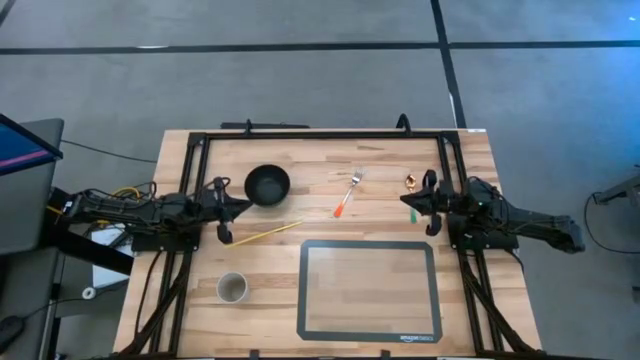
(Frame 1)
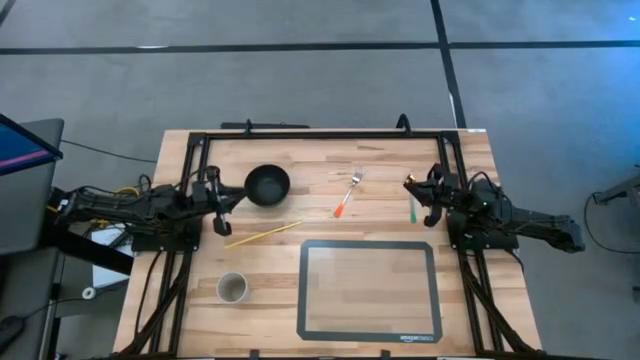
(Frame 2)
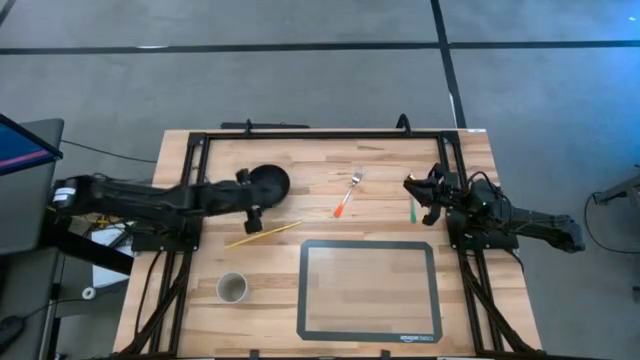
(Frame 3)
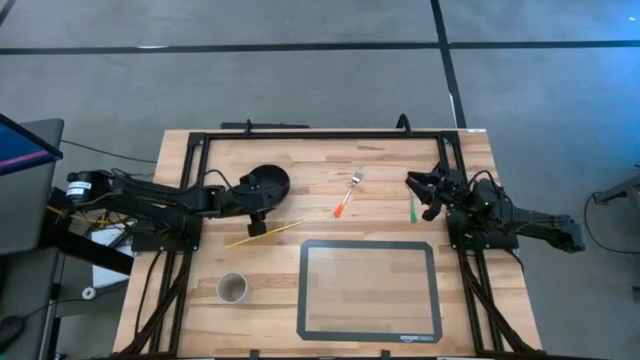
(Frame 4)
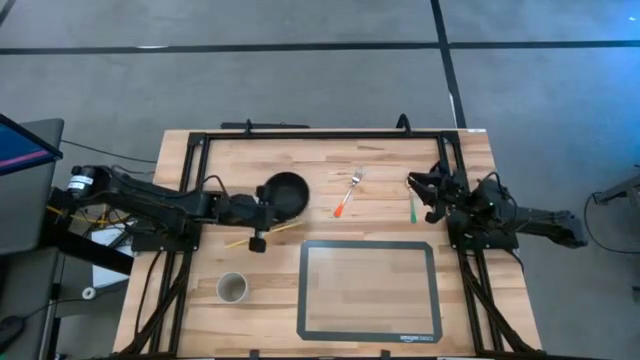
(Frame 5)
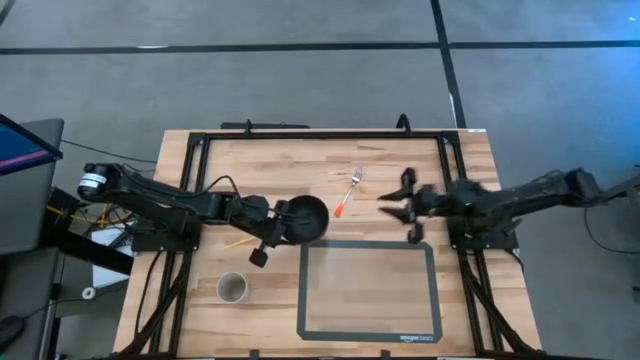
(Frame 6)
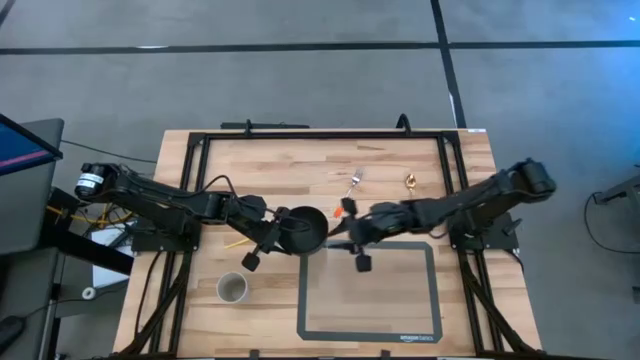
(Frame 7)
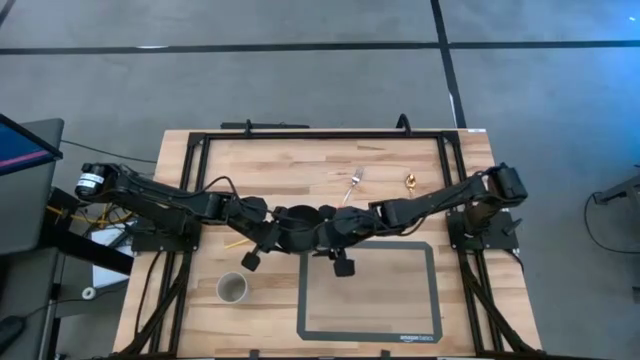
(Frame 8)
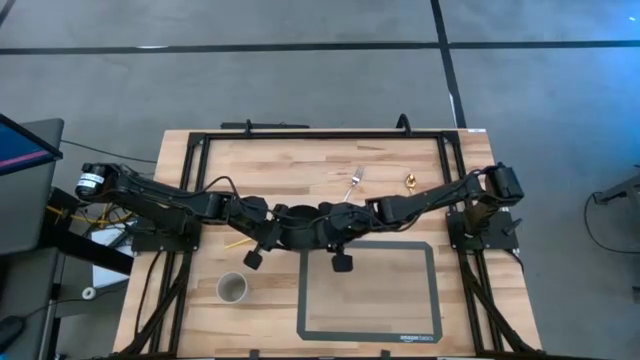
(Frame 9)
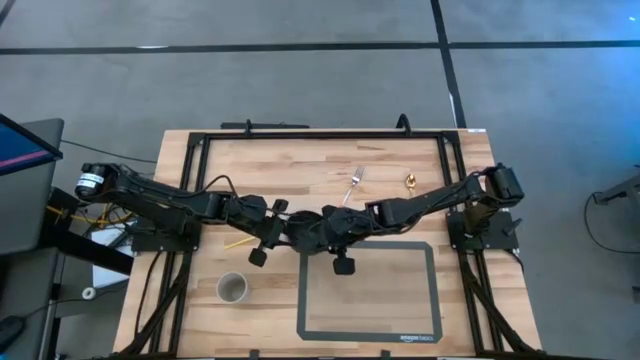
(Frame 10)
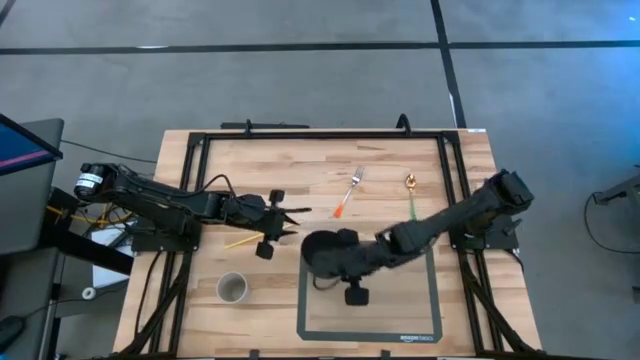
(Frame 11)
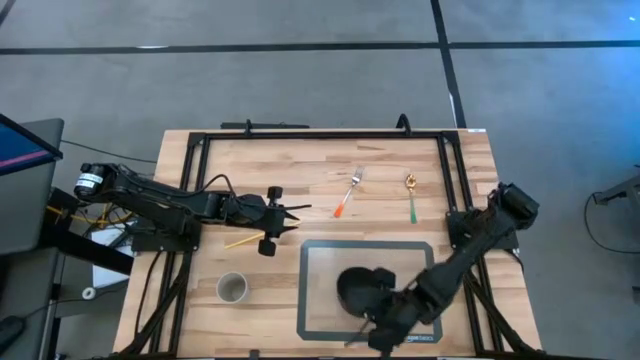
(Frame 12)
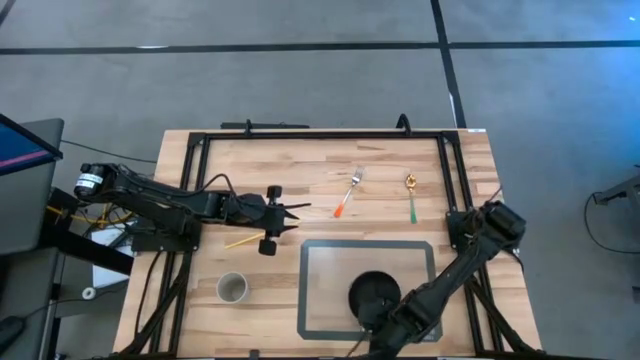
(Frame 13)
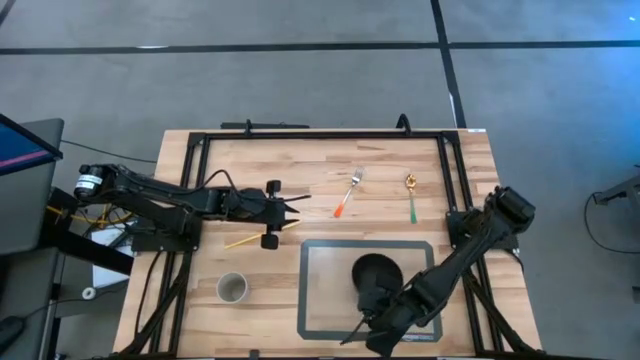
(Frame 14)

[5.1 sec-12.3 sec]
Task: Pick & Place Utensil
Put the black bowl on the transparent mat

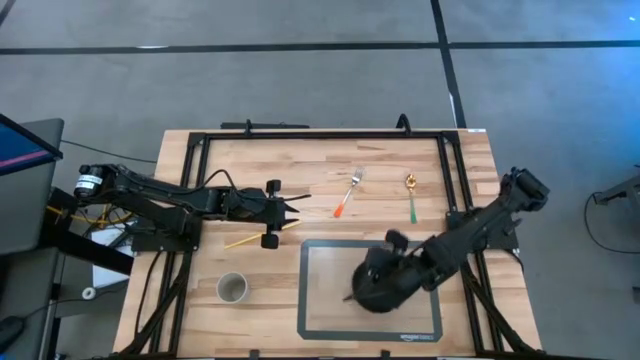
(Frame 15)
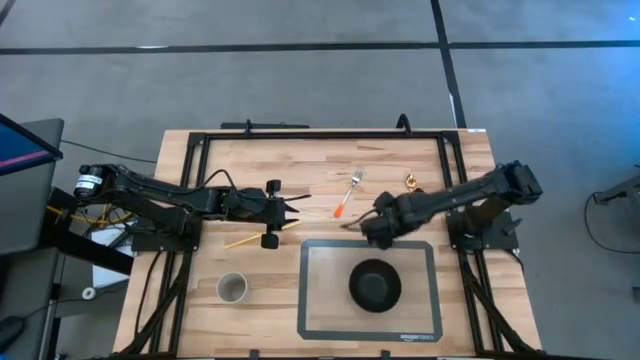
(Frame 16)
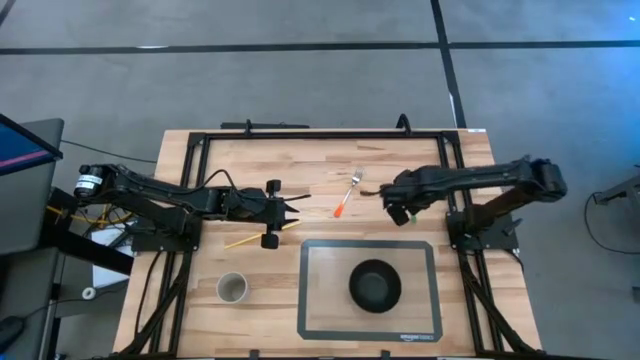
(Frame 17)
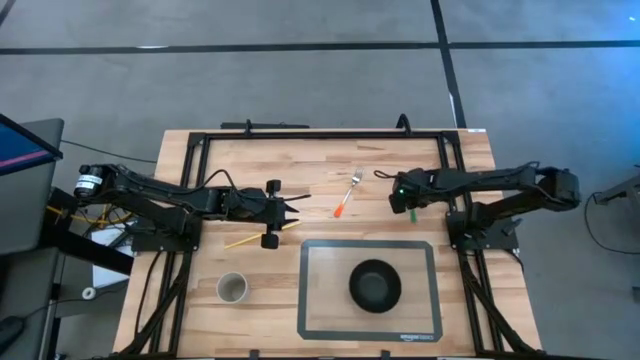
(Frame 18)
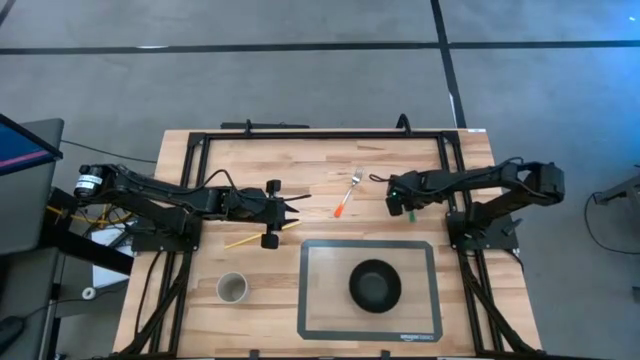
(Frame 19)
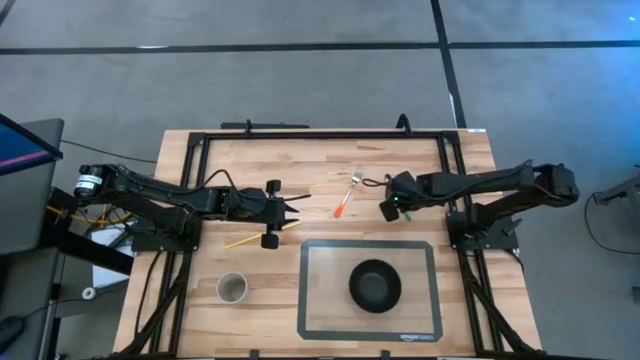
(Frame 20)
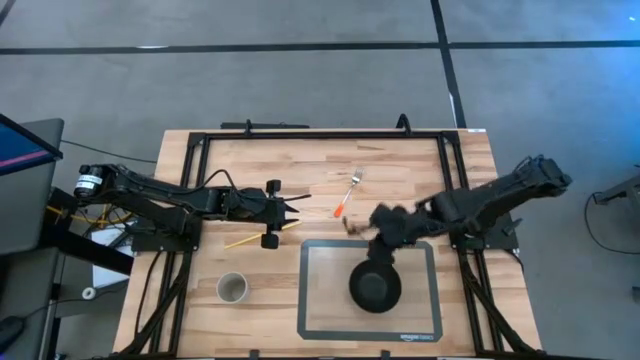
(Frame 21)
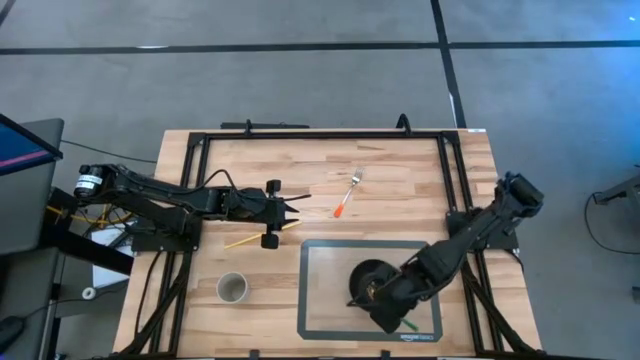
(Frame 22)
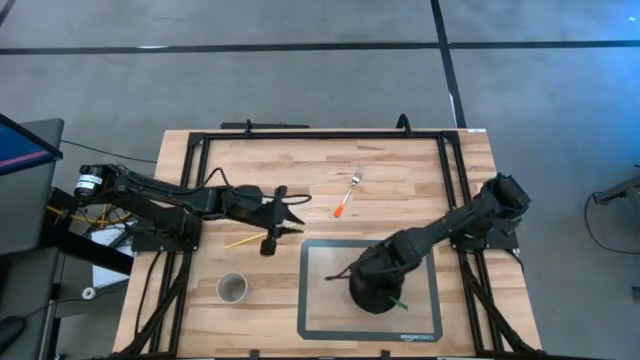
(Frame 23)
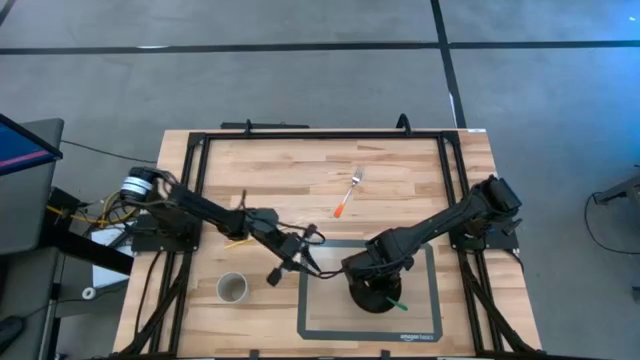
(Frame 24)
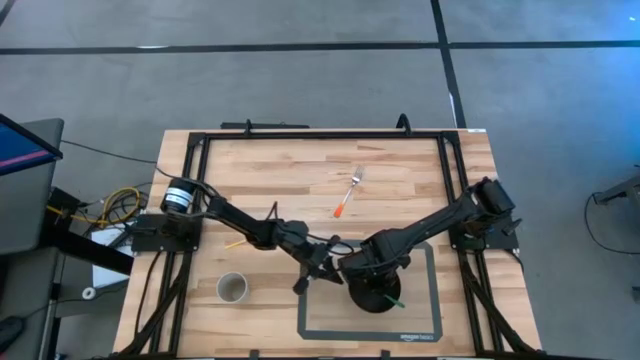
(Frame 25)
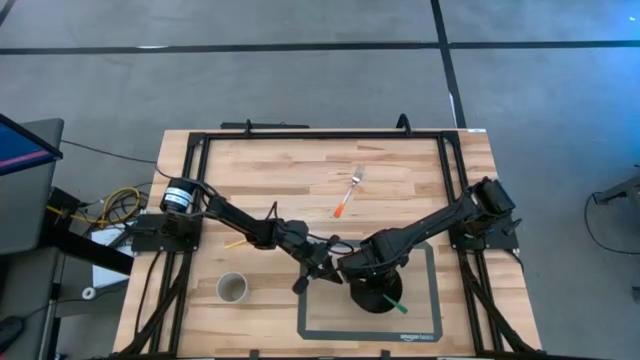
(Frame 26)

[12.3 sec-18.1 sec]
Put the green spoon into the black bowl

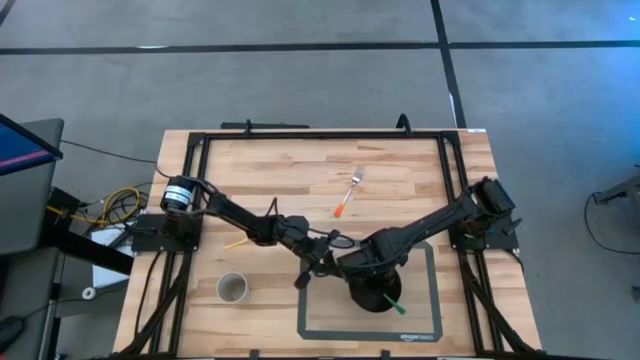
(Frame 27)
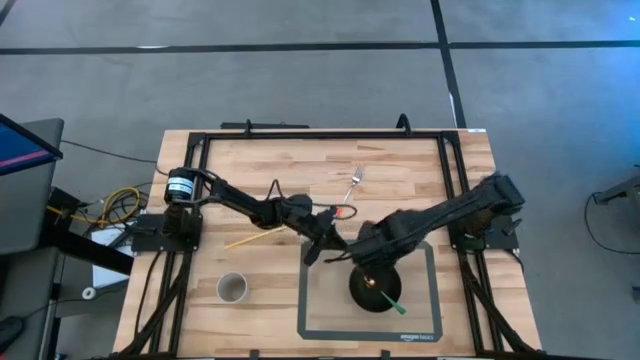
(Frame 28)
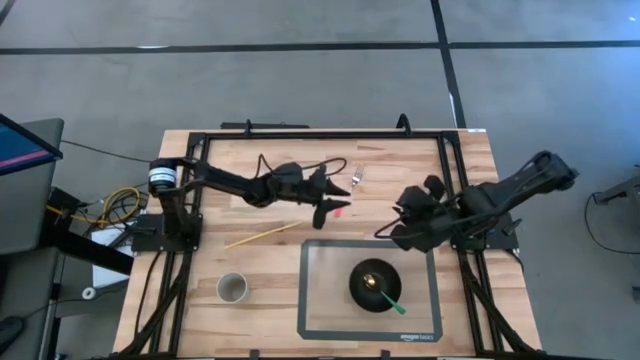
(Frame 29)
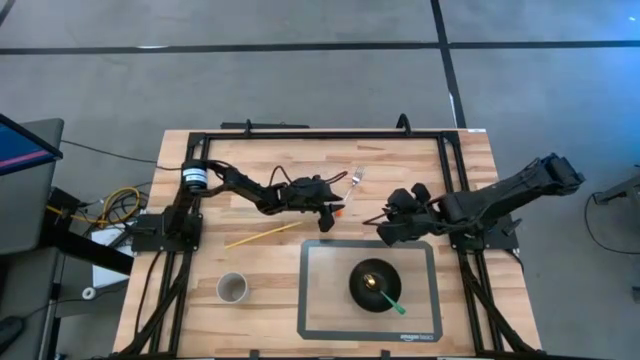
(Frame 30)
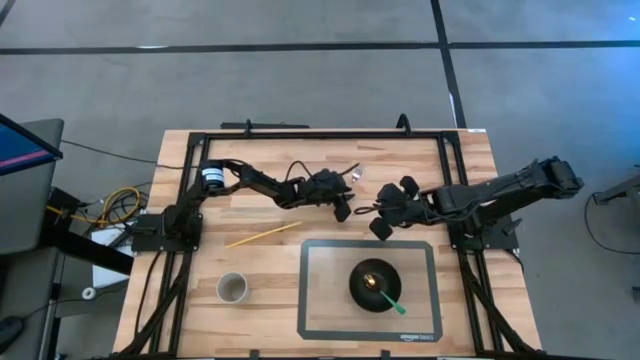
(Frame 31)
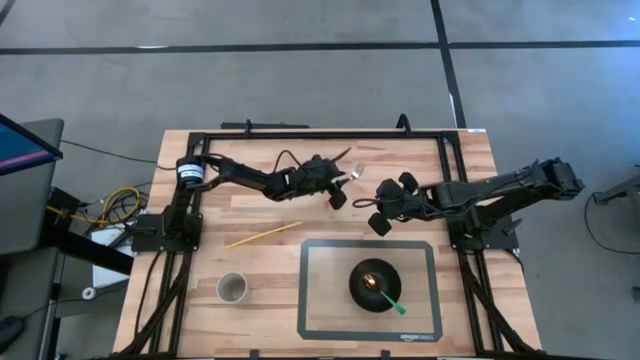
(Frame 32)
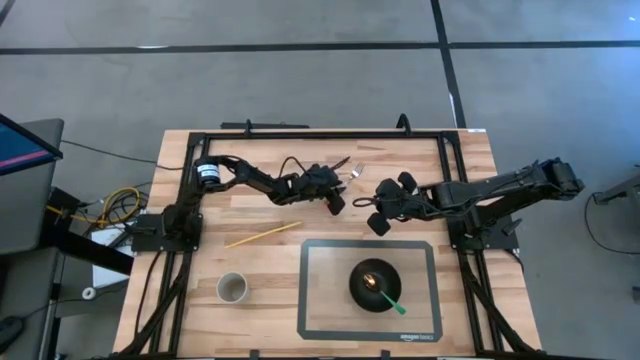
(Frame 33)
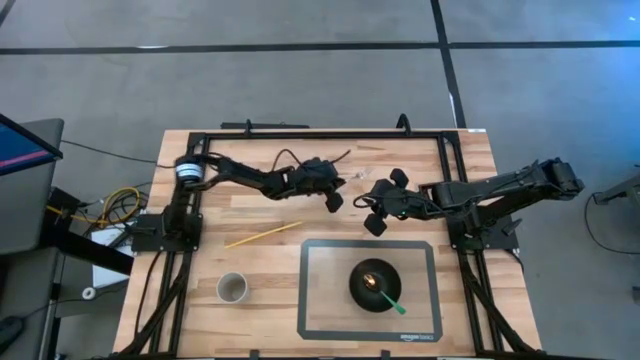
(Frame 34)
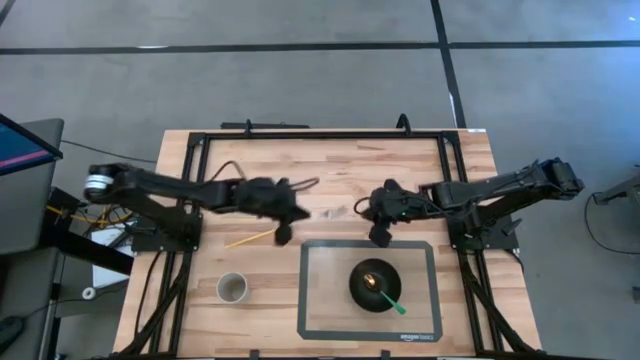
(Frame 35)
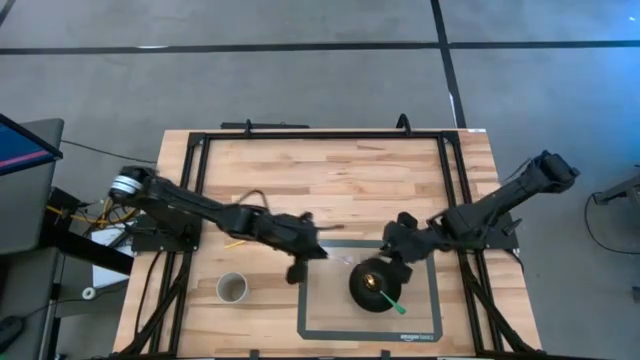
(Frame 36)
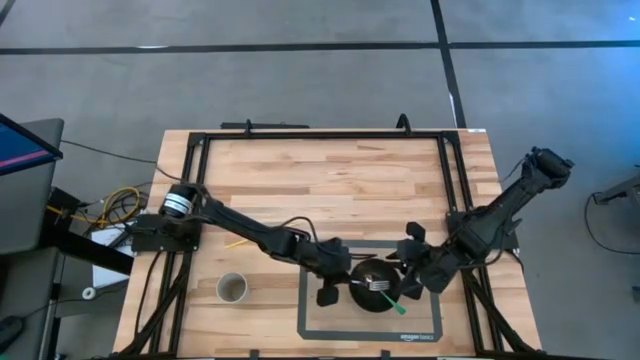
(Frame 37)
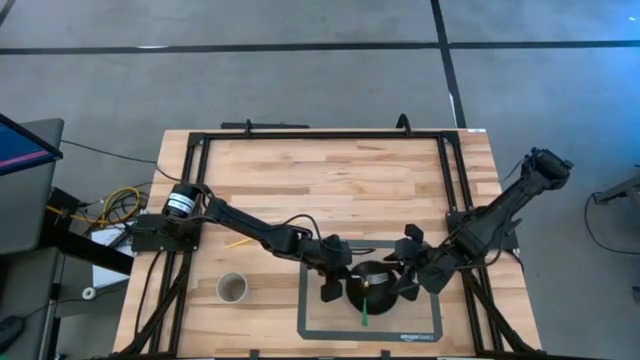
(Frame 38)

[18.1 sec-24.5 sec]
Put the orange fork into the black bowl

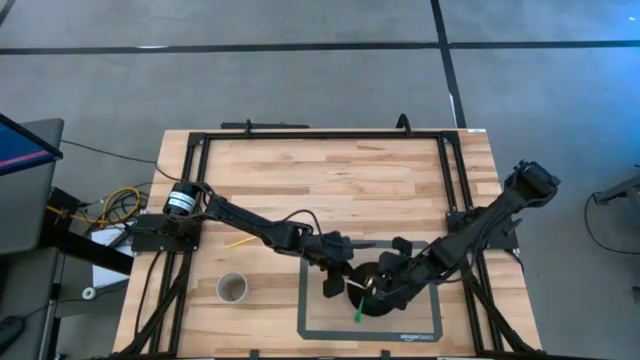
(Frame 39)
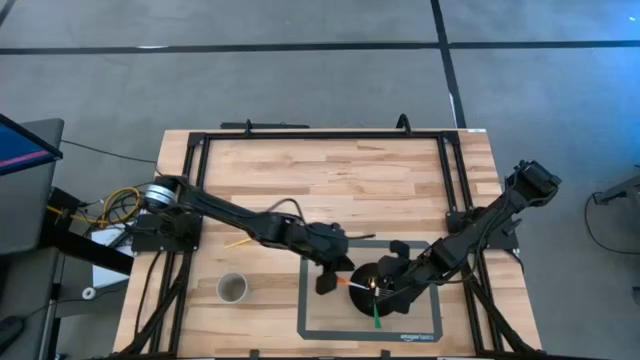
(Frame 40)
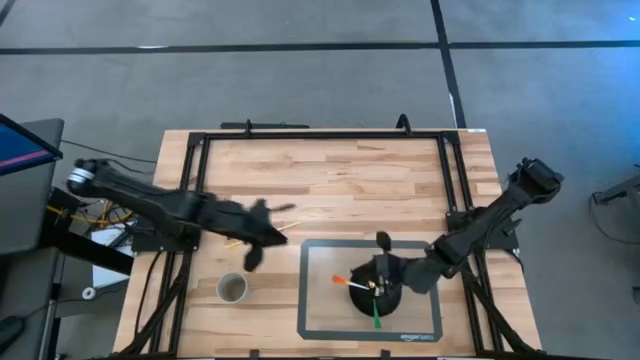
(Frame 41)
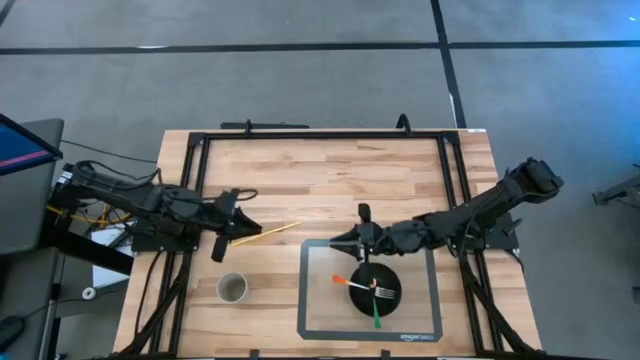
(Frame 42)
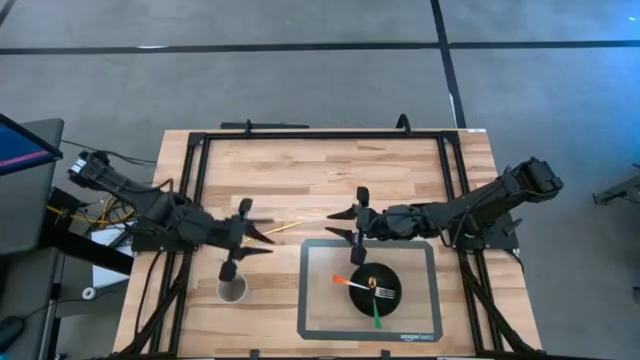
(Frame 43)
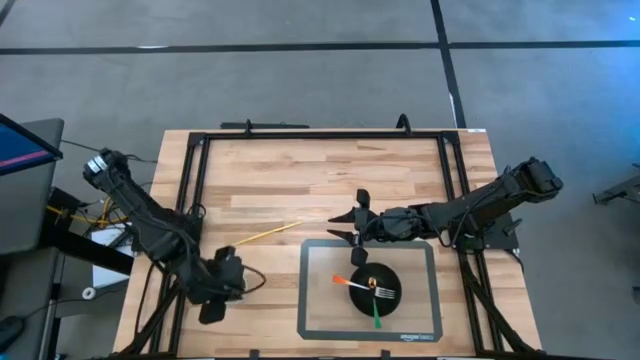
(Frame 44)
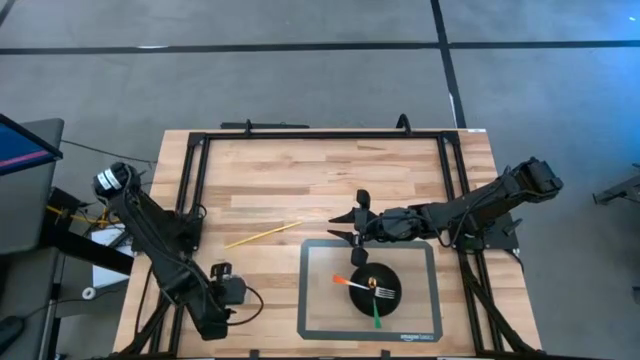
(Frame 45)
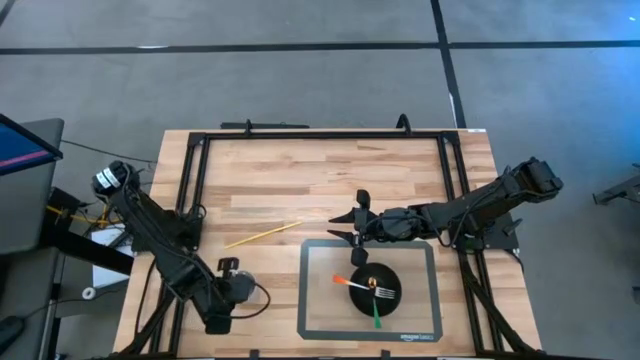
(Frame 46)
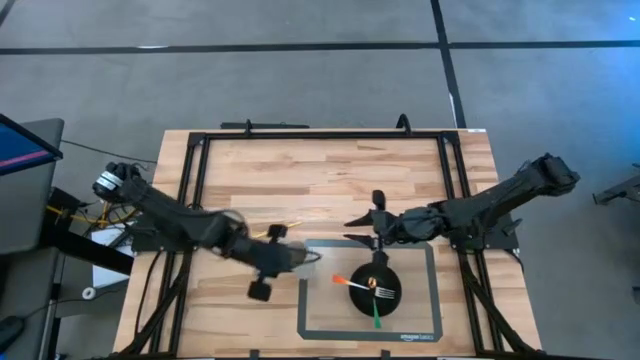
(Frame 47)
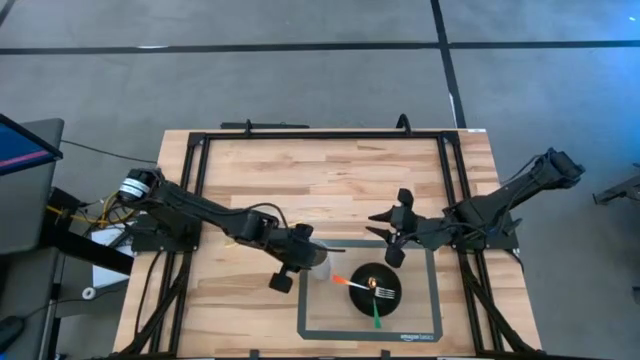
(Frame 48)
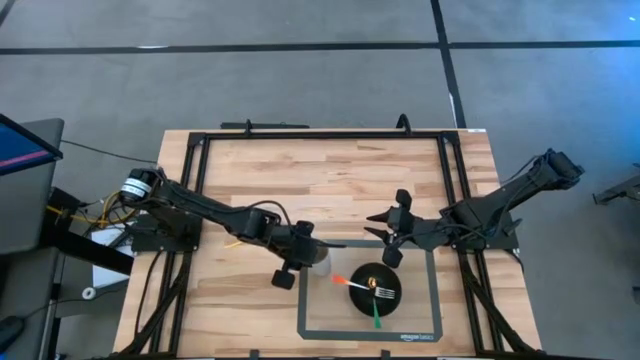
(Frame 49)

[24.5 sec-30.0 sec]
Put the white cup on the transparent mat
